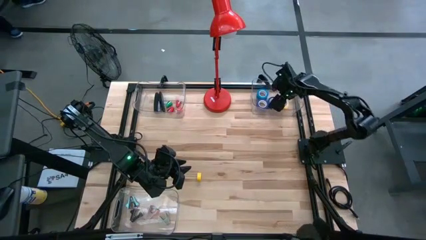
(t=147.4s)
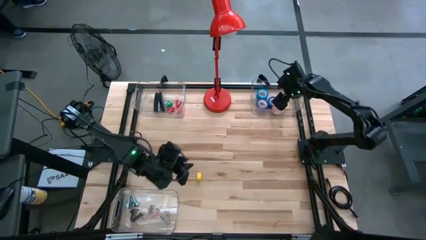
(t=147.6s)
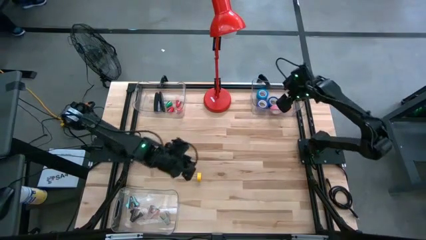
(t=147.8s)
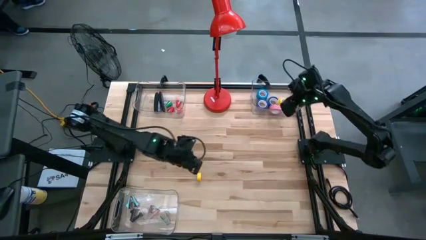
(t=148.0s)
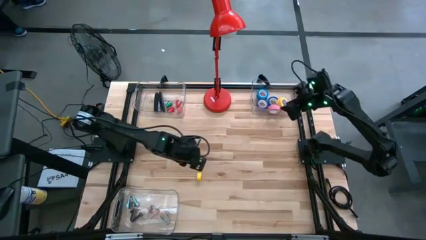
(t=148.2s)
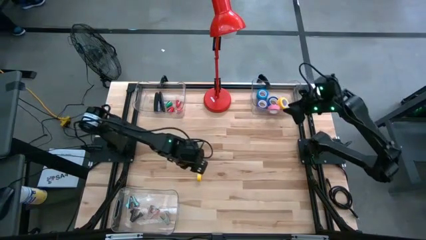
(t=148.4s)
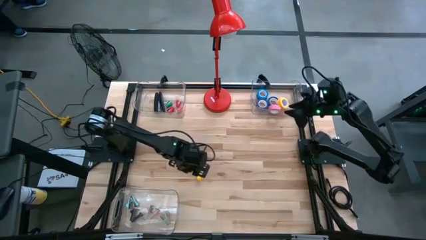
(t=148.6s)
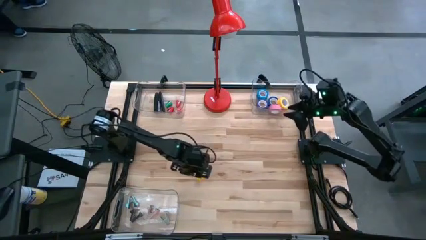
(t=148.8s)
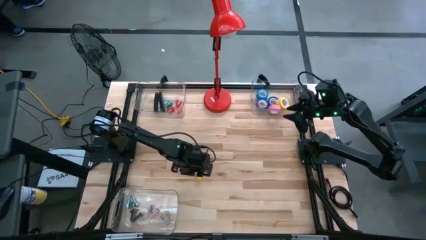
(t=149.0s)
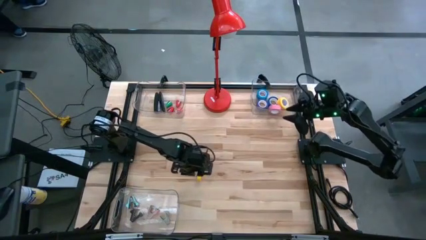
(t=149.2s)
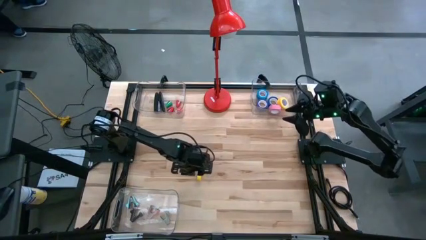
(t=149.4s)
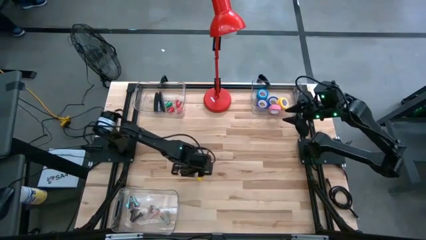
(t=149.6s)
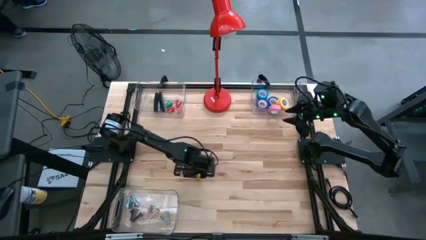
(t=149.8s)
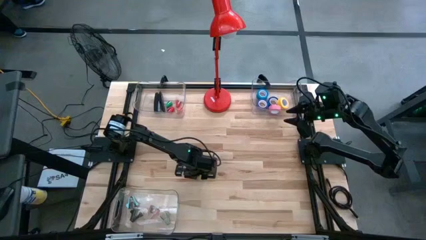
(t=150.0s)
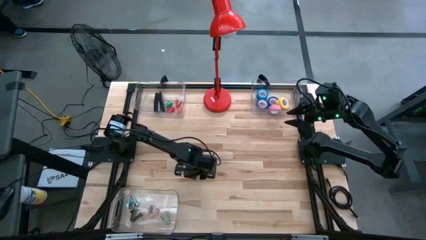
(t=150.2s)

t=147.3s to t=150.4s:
Task: Pick and place Stapler, Stapler remover, tape
Put the yellow stapler into the top left transparent bin

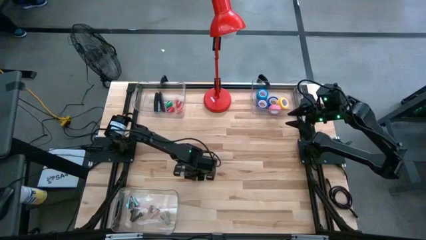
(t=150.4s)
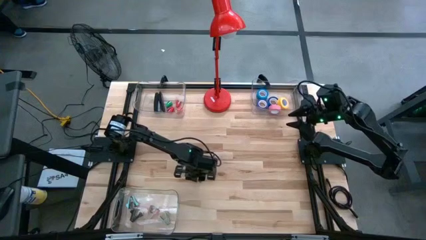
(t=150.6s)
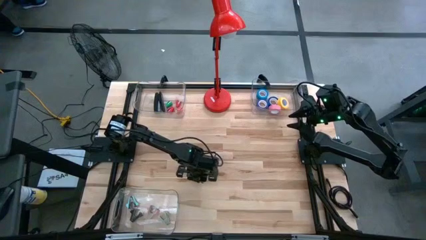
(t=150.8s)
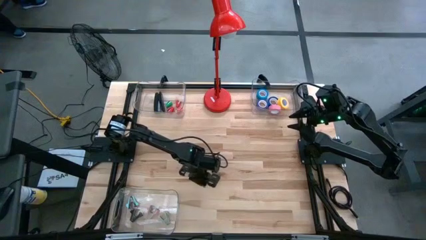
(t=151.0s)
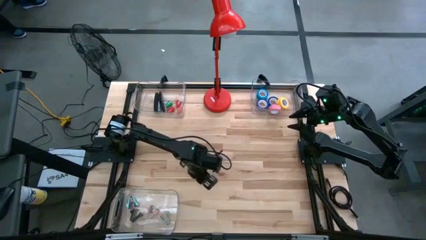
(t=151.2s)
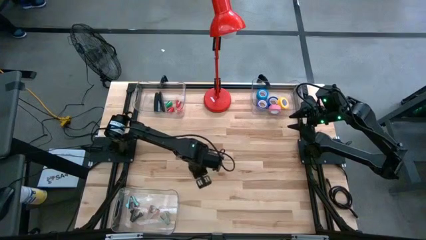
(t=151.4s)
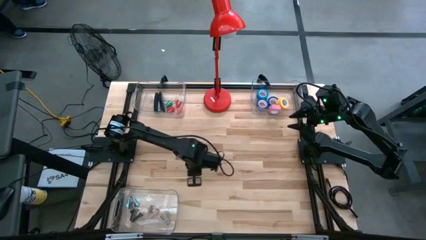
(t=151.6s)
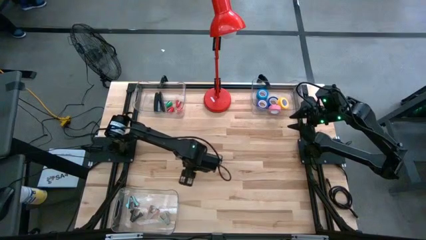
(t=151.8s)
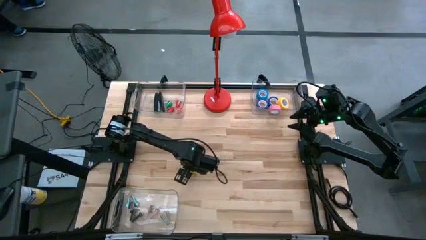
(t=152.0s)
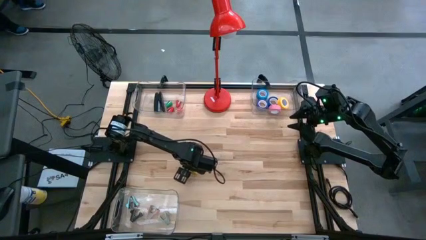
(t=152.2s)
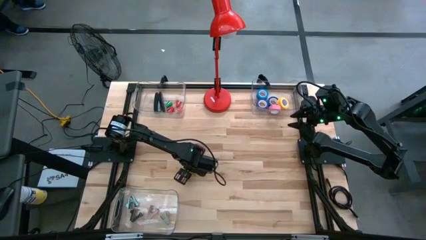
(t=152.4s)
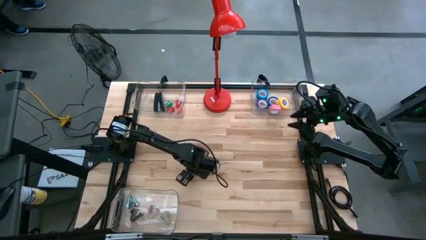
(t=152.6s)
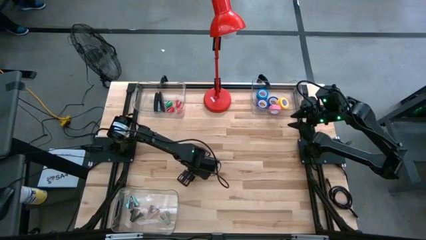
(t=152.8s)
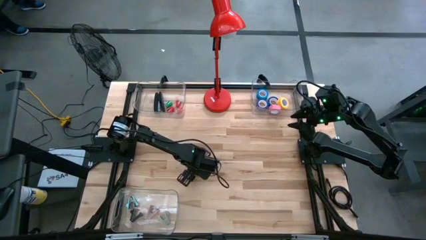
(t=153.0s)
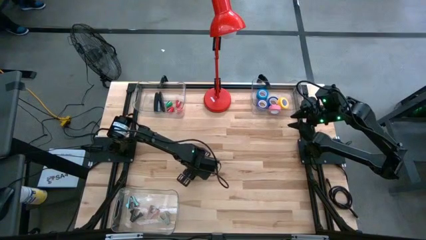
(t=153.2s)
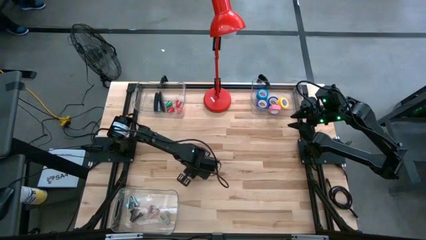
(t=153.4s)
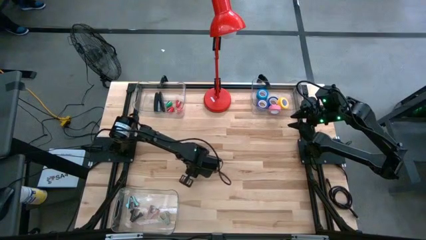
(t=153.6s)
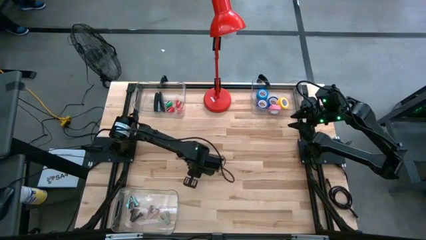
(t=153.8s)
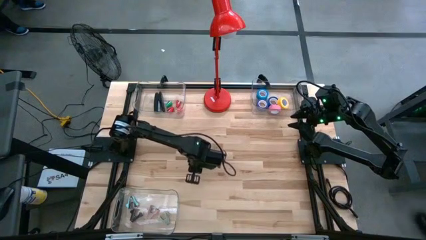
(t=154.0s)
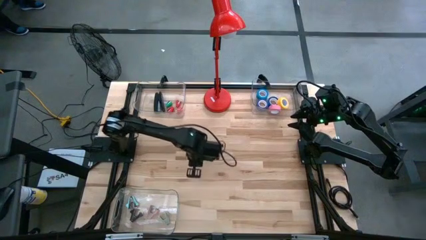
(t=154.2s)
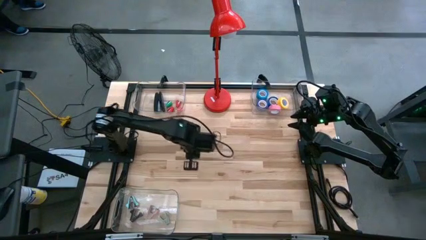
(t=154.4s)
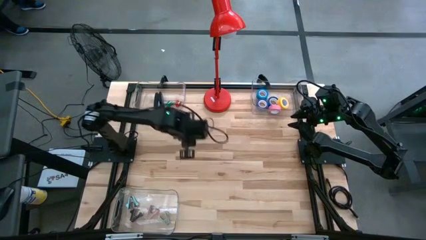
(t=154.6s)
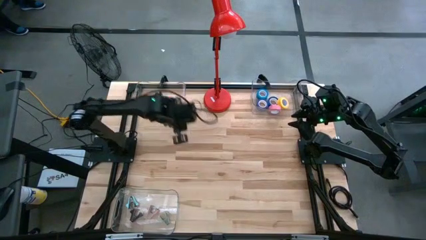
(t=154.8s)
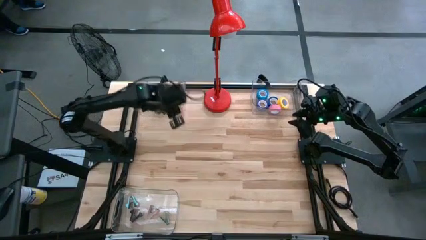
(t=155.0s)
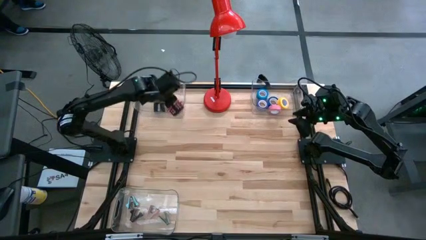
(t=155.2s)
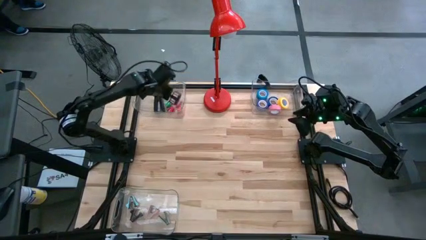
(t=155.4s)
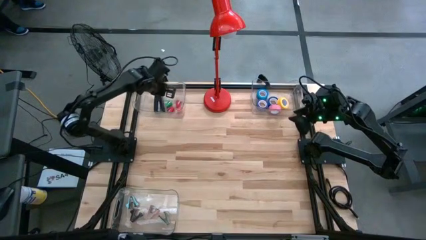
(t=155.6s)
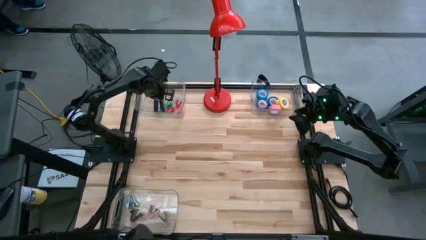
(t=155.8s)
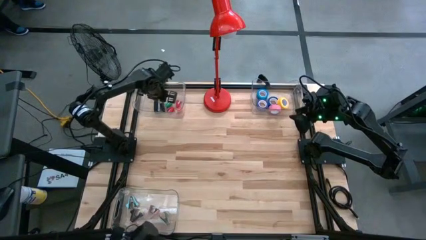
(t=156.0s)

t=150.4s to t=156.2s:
Put the yellow stapler into the top left transparent bin

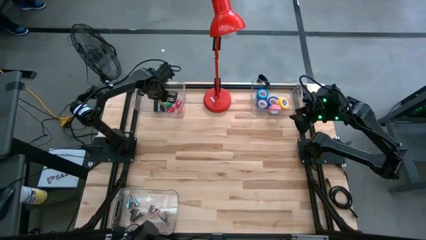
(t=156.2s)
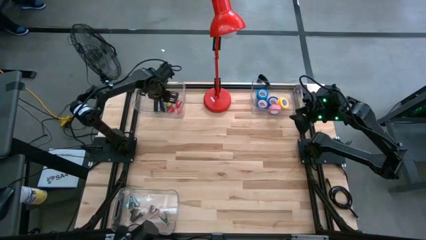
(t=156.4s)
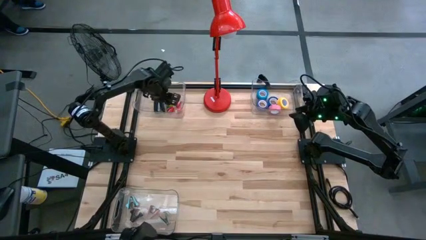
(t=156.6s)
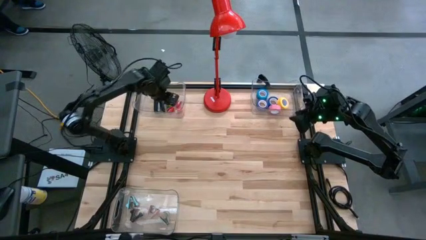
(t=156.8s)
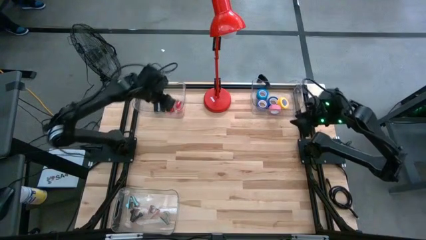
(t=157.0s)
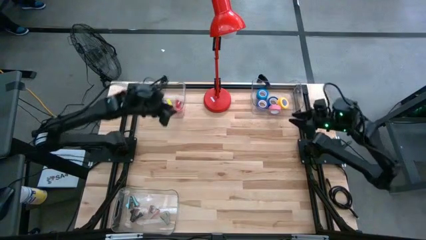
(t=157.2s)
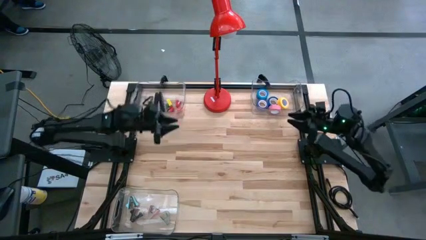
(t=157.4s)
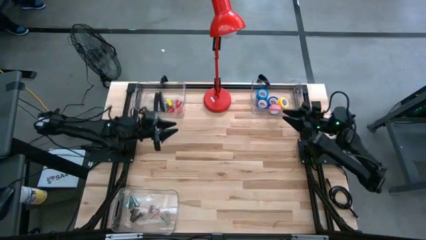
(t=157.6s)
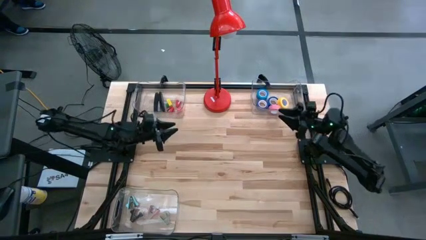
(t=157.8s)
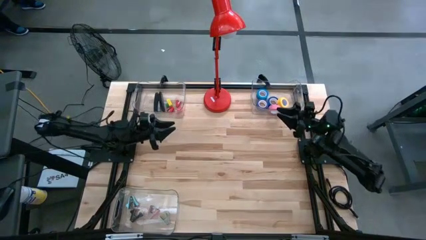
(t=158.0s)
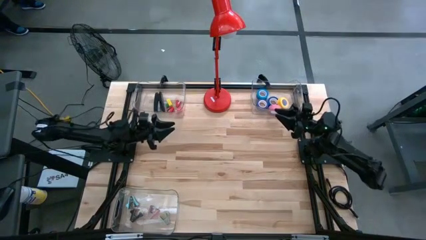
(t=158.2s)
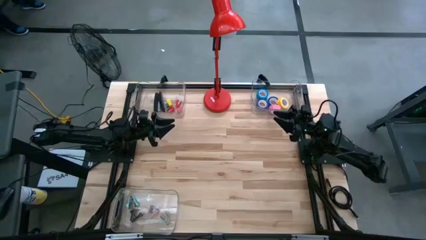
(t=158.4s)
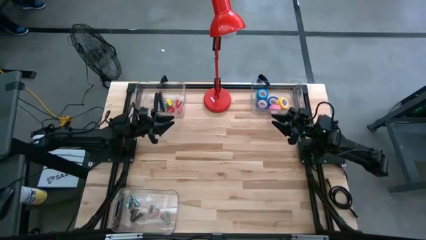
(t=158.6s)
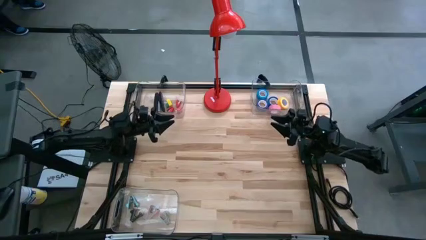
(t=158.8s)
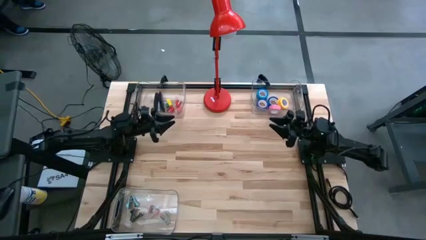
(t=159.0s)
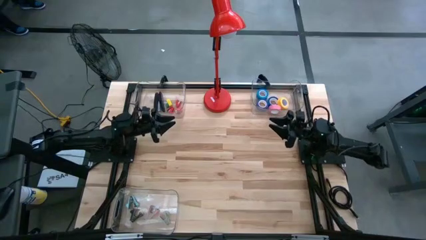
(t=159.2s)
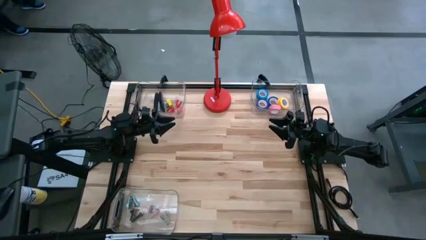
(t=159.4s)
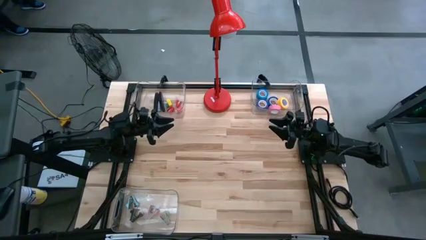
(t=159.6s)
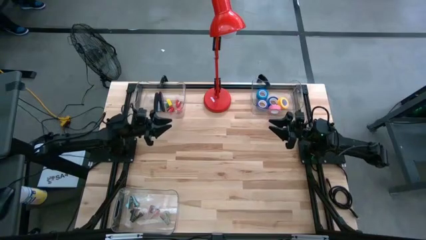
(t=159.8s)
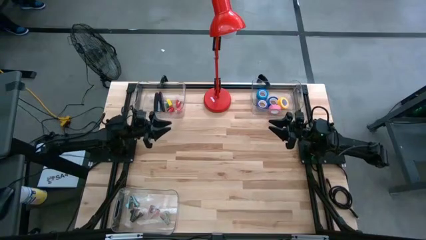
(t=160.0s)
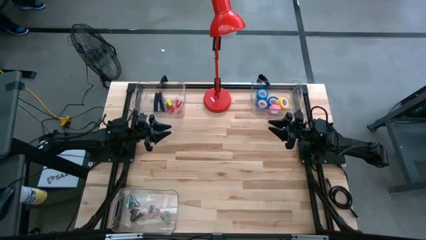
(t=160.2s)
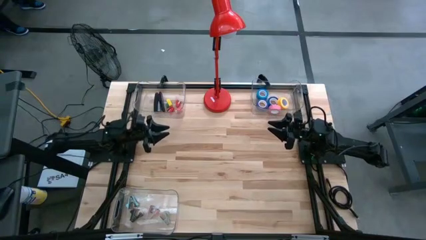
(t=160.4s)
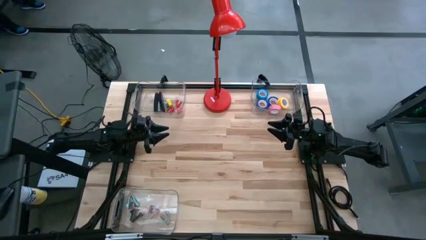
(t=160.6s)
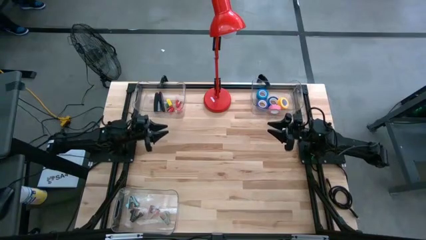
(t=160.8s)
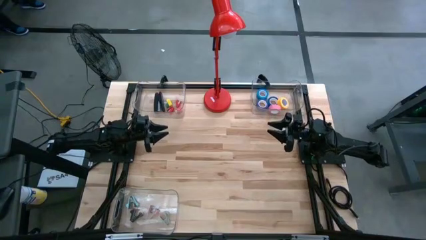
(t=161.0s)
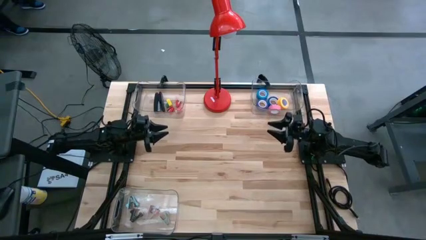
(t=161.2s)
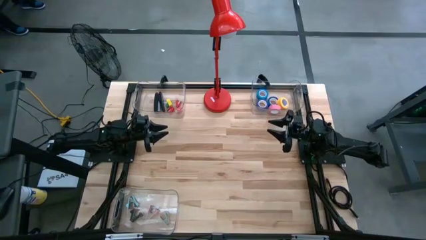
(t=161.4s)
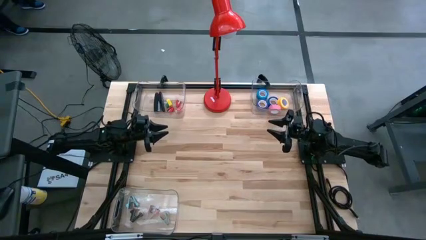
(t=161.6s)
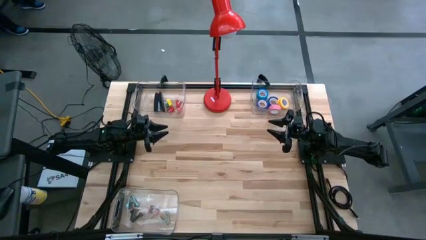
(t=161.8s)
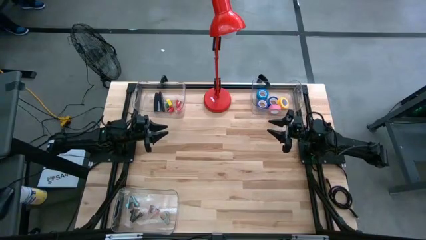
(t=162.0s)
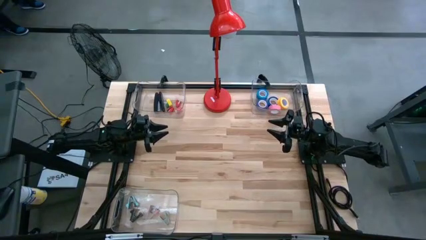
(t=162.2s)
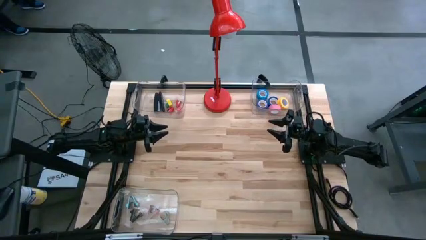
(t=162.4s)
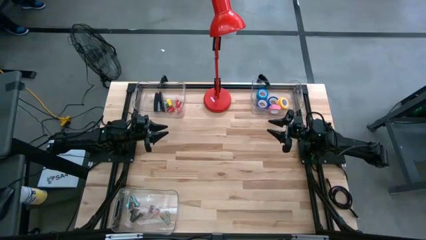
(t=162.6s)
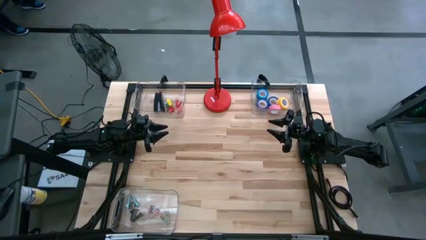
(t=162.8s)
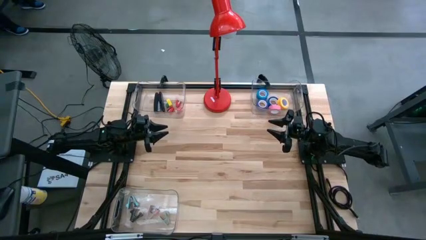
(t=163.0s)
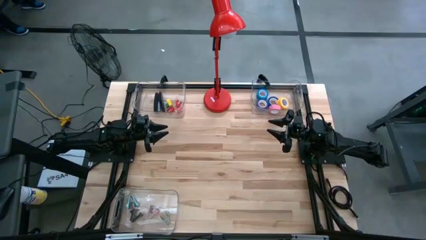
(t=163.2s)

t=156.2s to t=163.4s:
Return to Home Position
